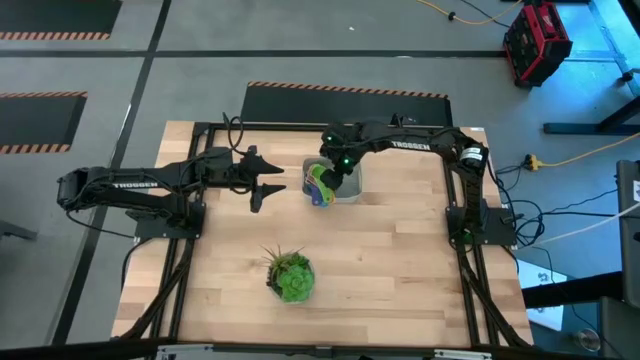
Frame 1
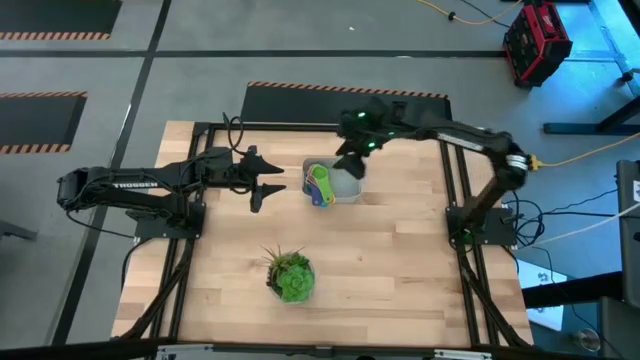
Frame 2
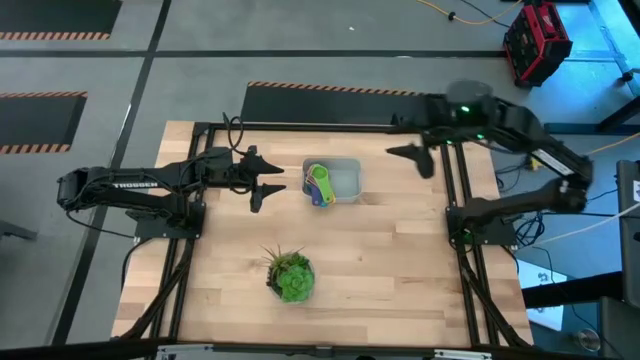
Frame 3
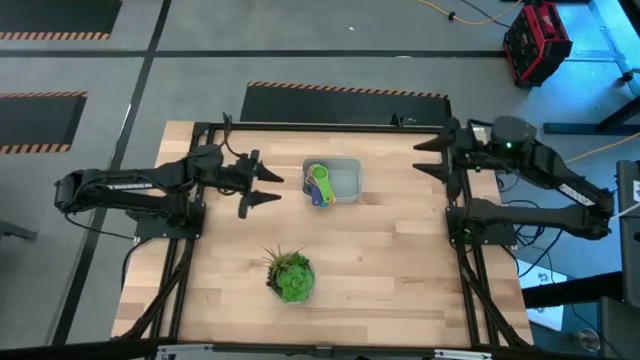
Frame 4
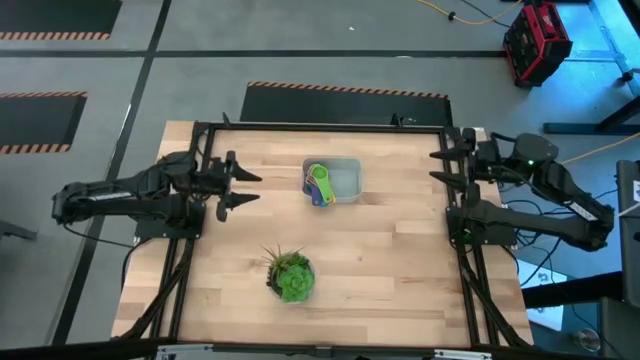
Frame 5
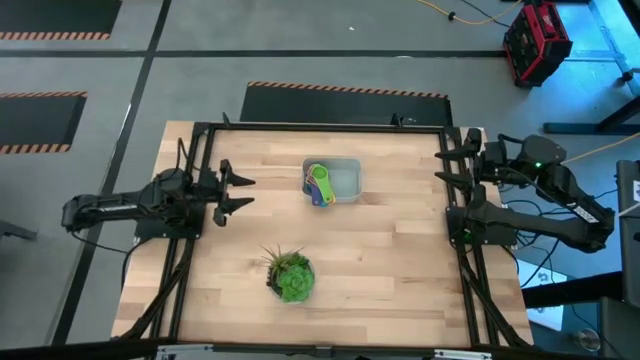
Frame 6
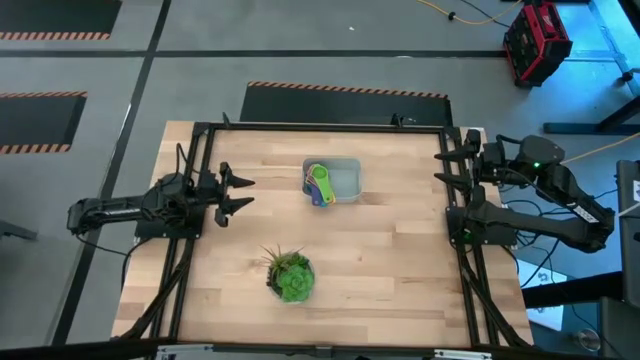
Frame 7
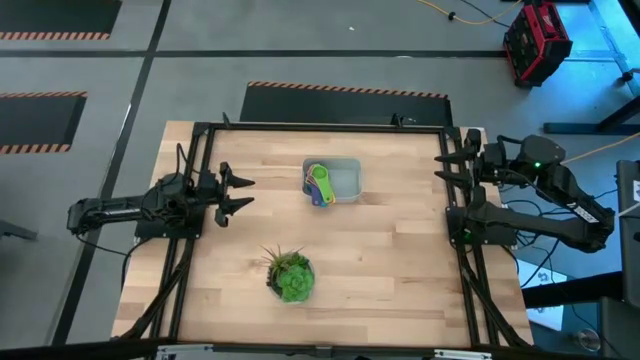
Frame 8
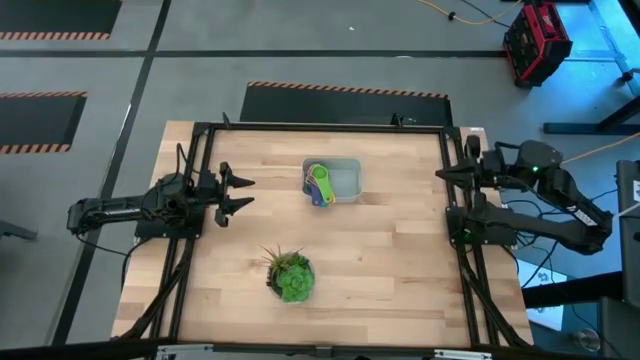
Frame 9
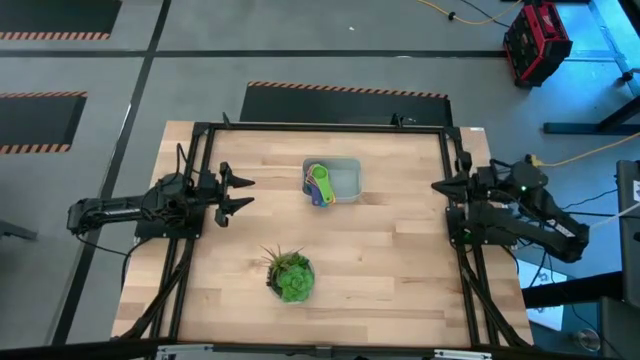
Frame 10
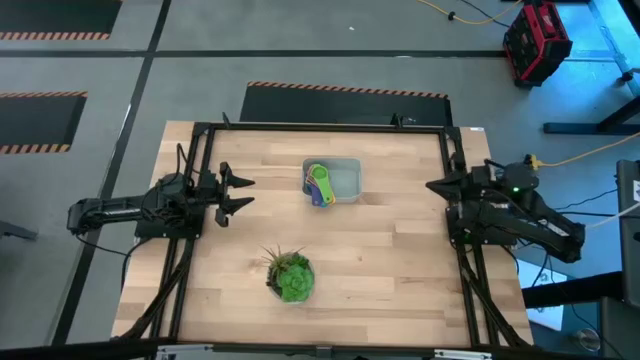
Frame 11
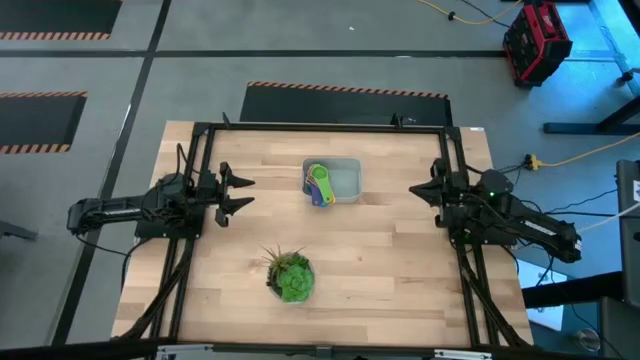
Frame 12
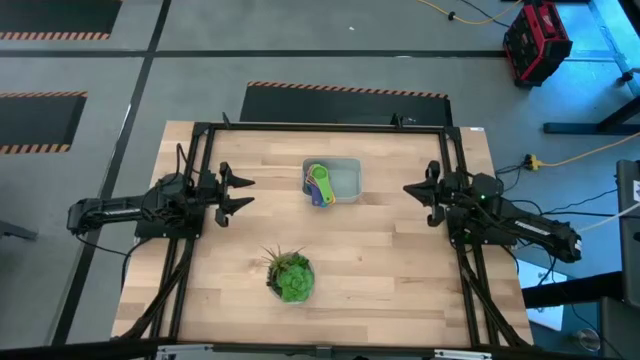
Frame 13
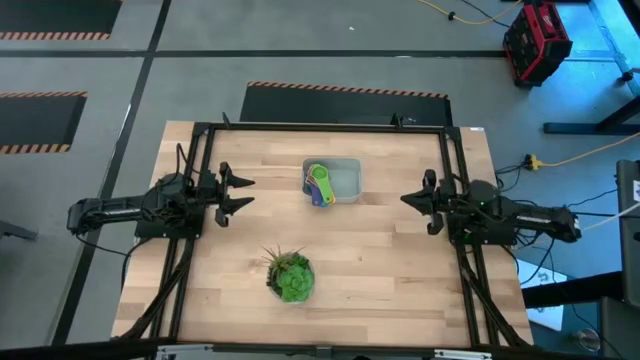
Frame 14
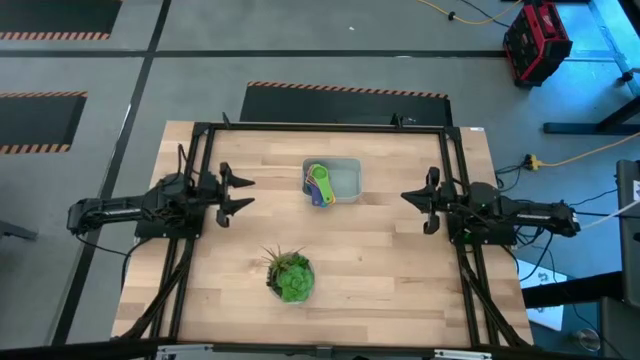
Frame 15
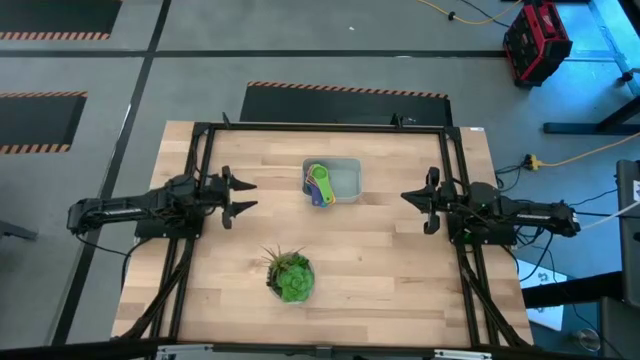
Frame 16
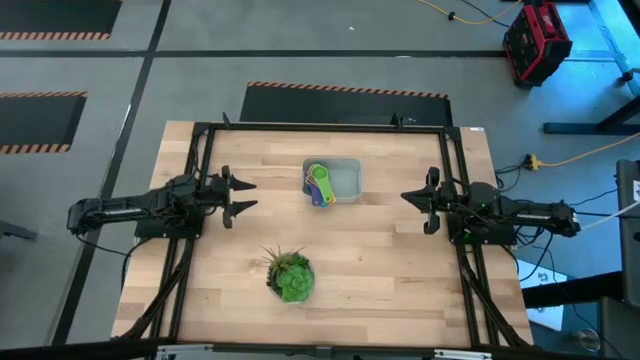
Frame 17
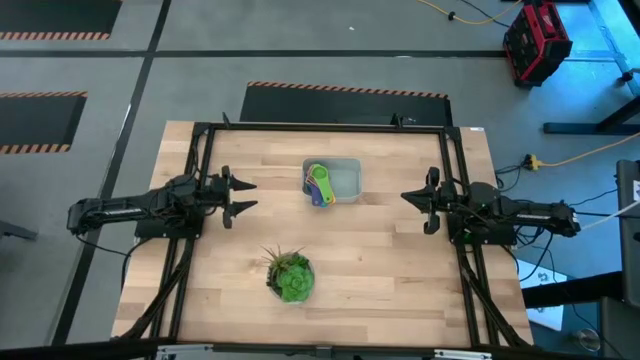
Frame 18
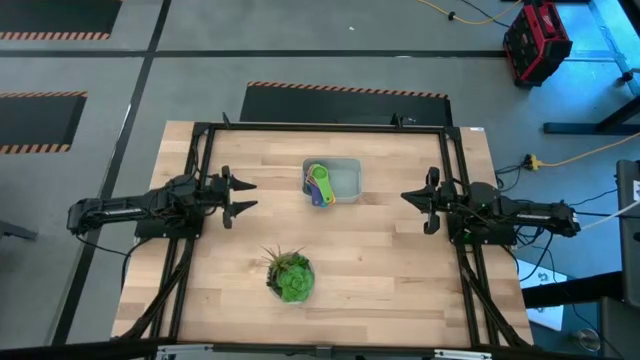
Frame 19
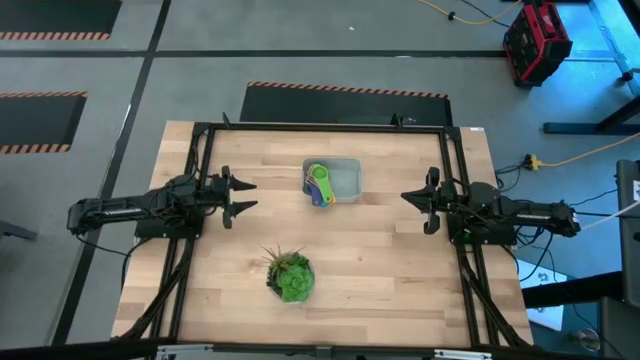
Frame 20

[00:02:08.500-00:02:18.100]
Task: Nest measuring cups in basket
Return to Home Position

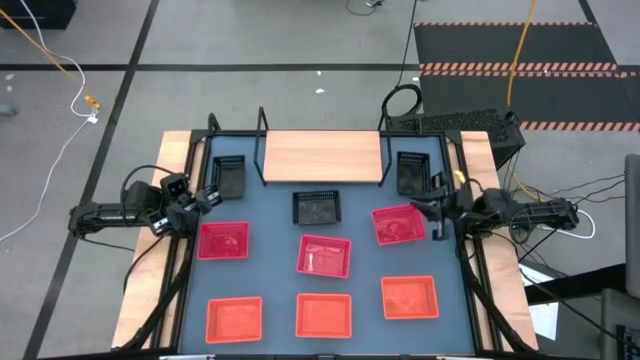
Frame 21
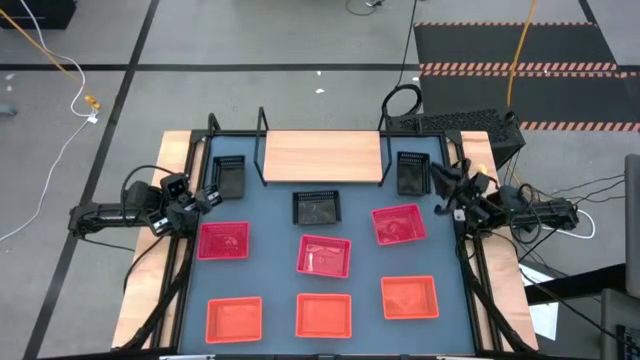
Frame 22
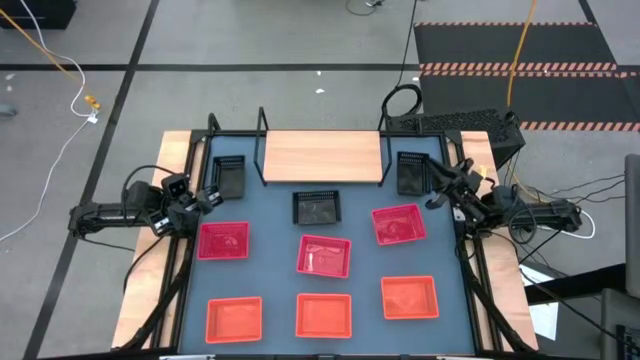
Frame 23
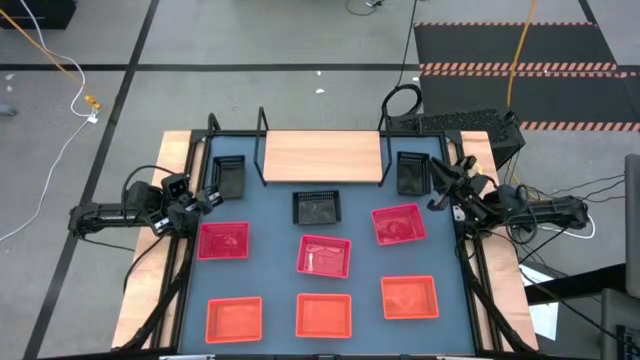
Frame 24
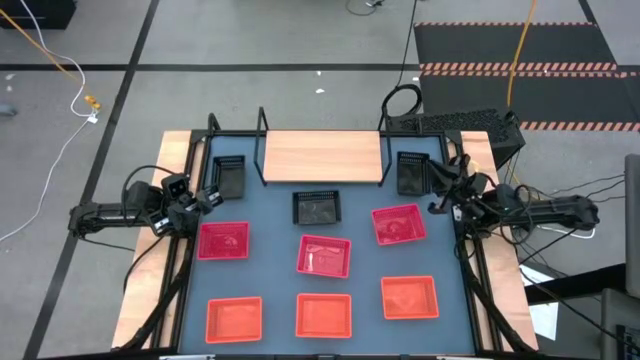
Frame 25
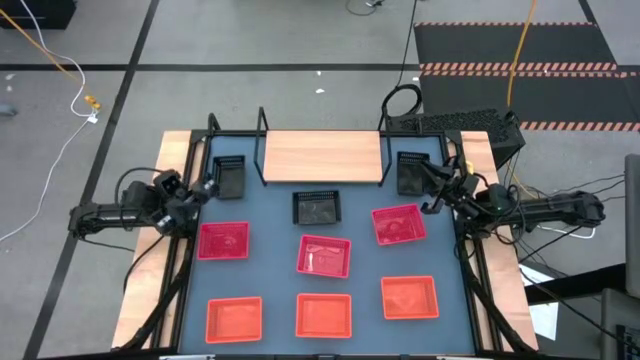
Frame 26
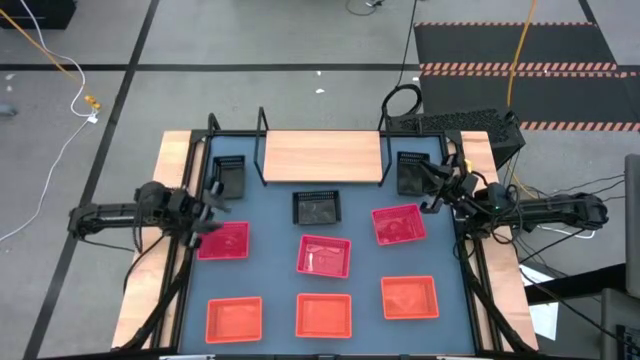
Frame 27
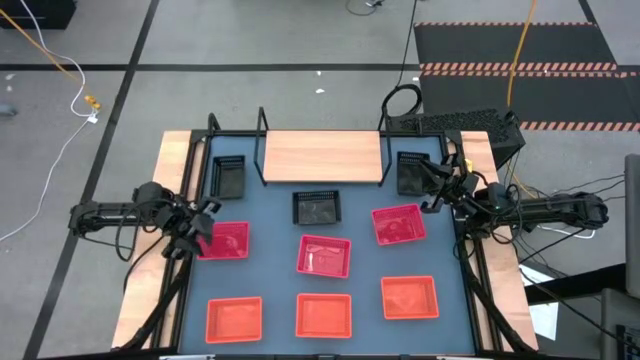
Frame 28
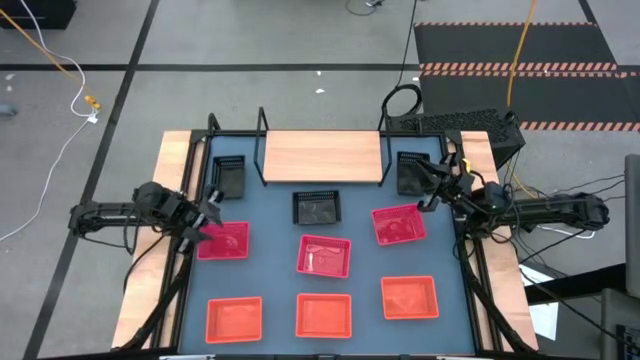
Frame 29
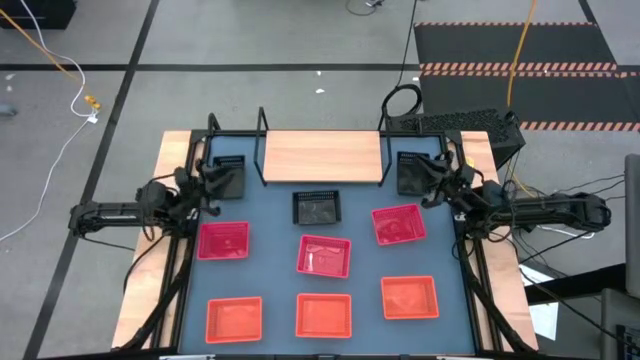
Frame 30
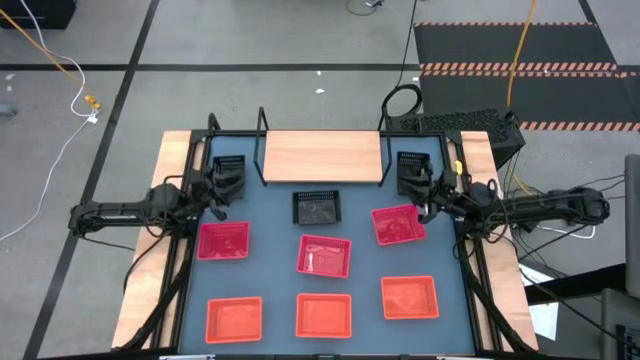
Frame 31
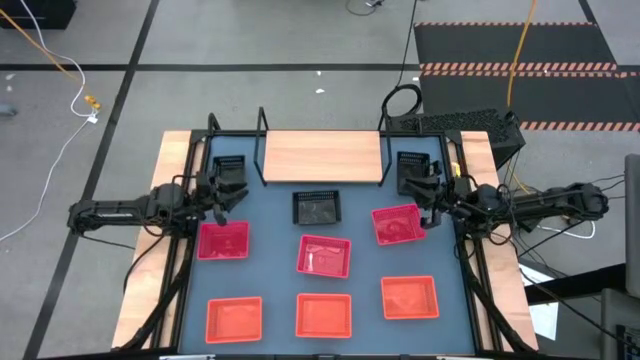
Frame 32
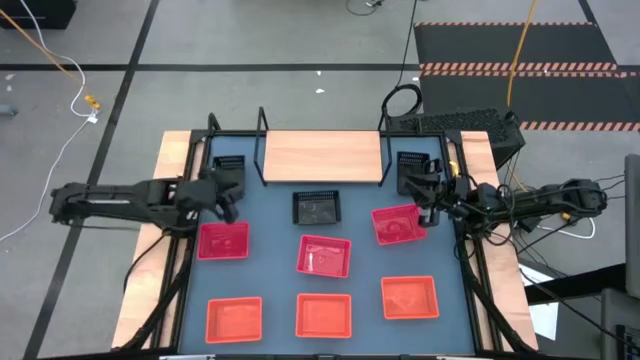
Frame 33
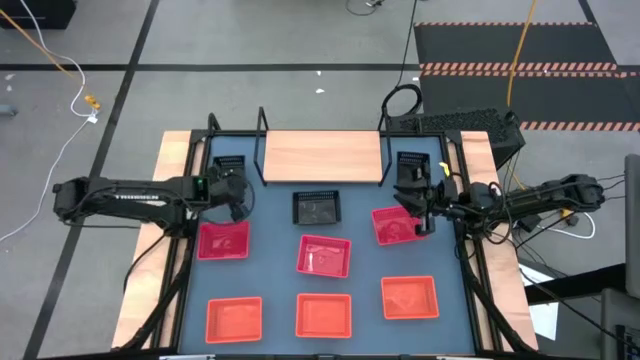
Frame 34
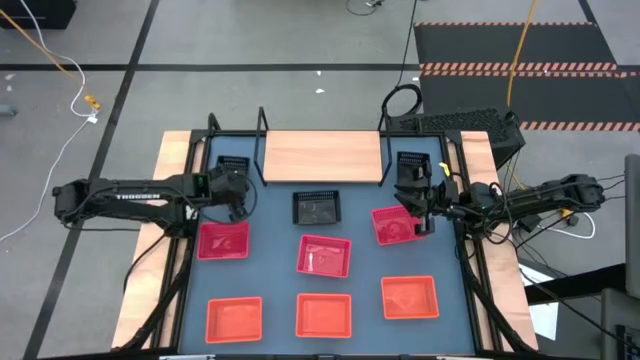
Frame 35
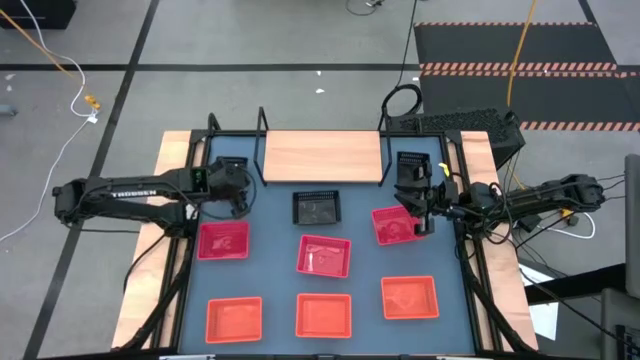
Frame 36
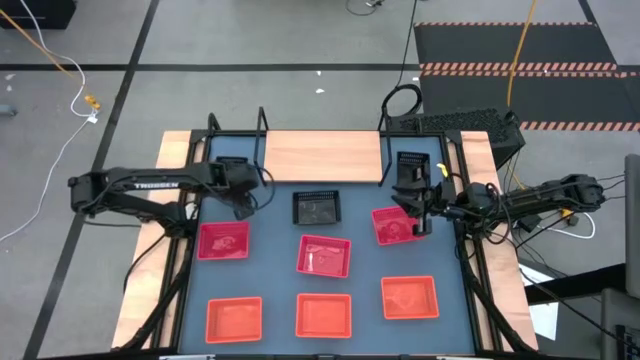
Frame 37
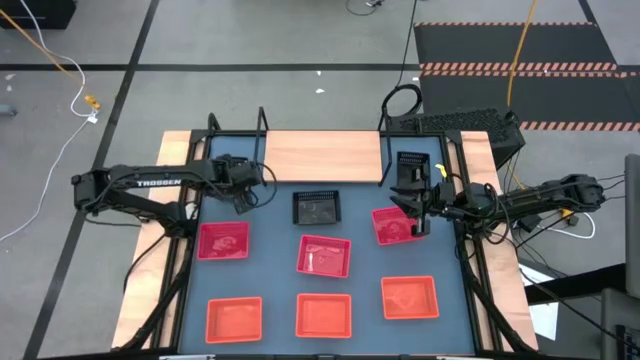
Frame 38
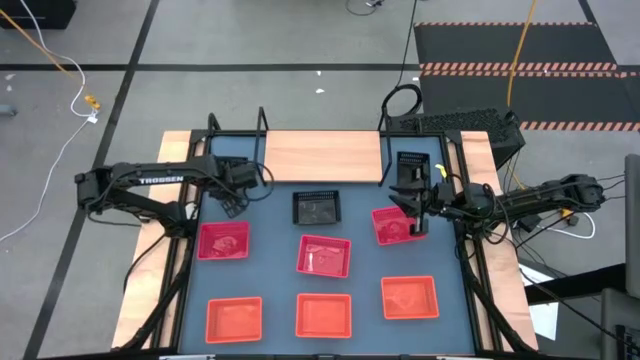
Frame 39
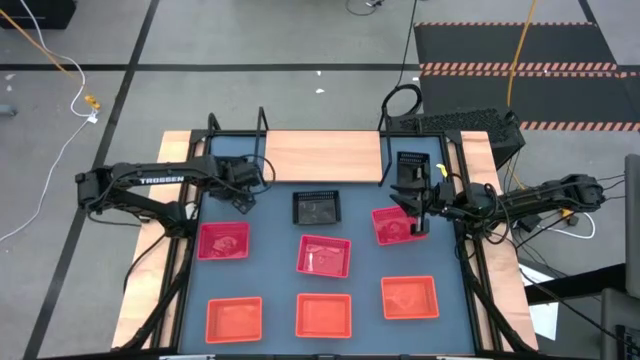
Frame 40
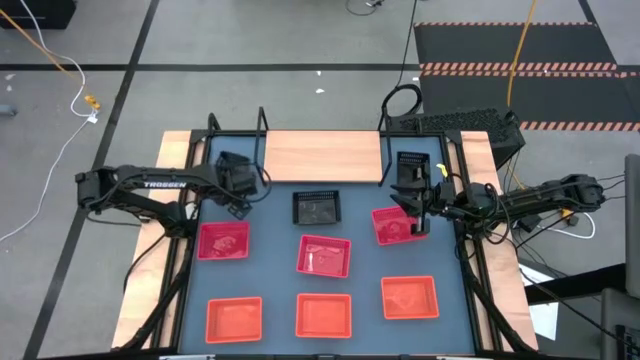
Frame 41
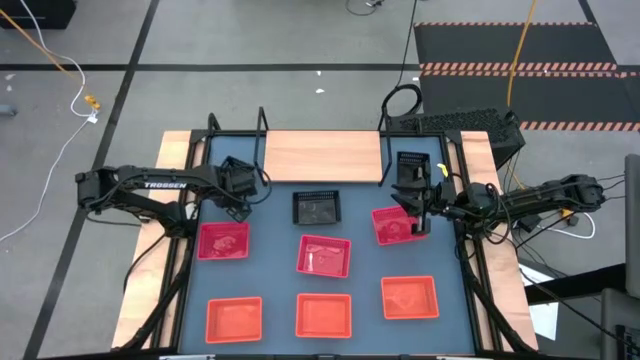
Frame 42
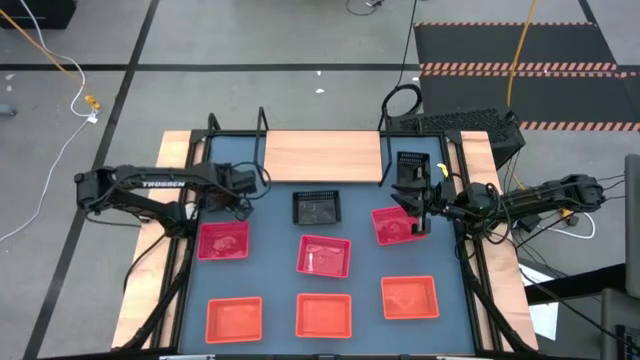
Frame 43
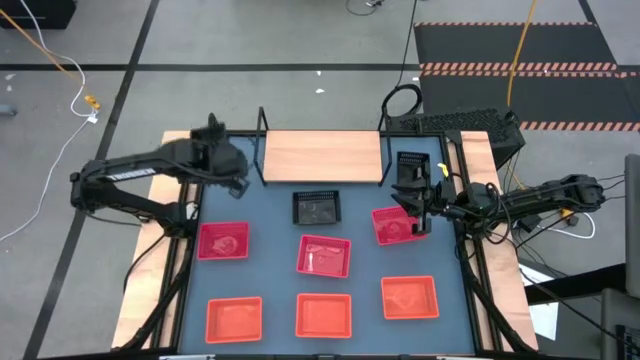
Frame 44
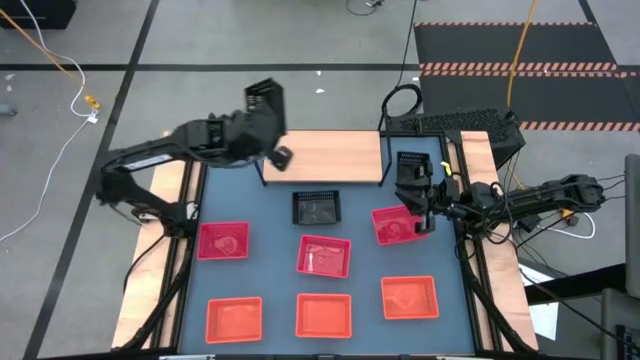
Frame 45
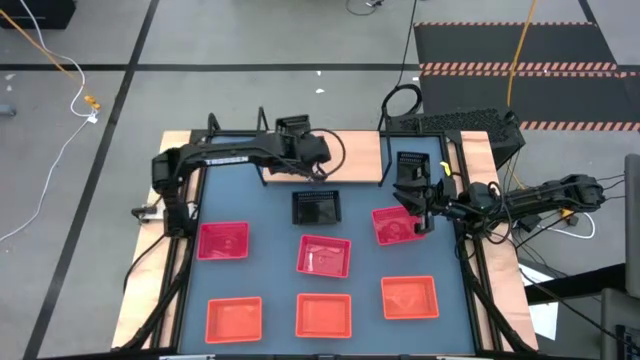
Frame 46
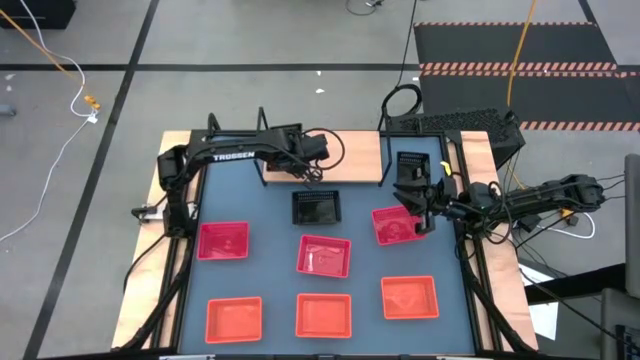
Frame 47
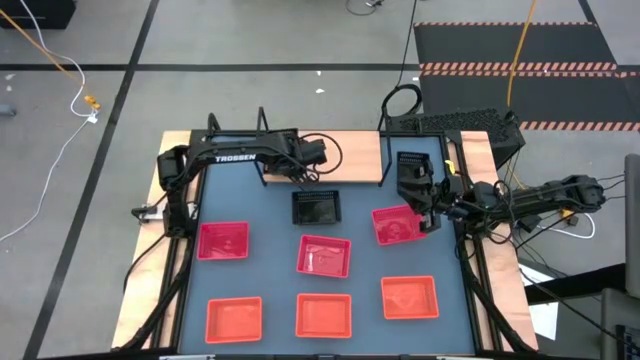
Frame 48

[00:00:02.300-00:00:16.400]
Task: Stack baskets on shelf by color
Put the left black bin on the shelf
